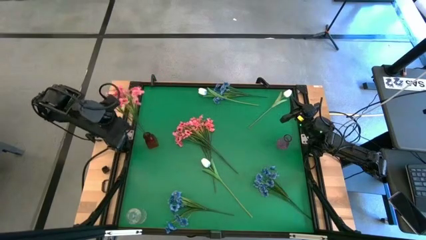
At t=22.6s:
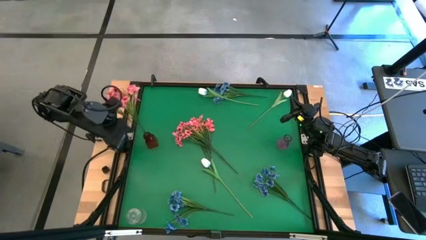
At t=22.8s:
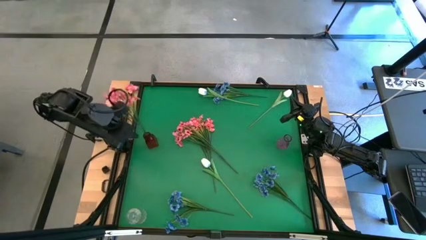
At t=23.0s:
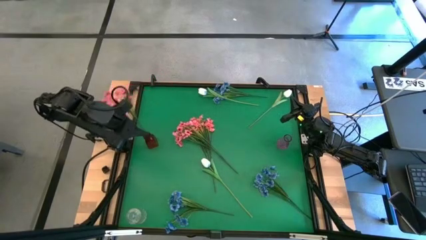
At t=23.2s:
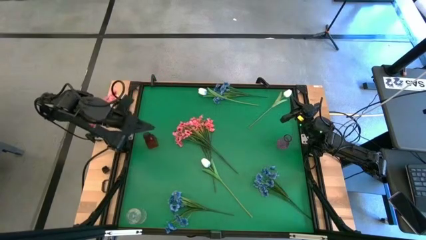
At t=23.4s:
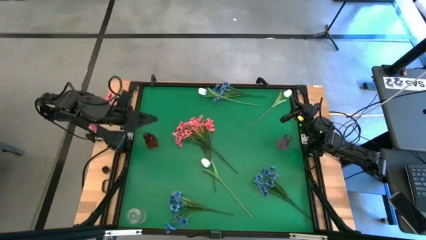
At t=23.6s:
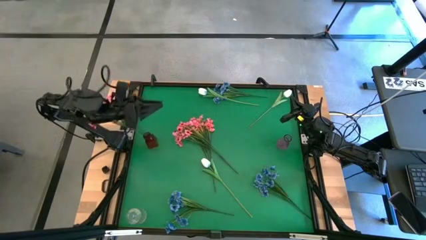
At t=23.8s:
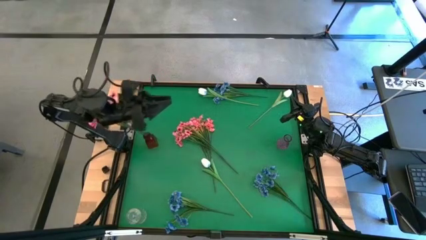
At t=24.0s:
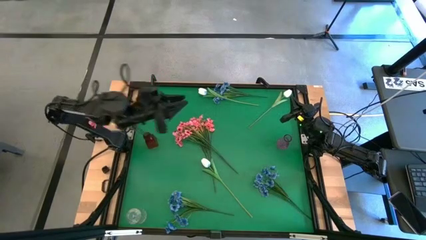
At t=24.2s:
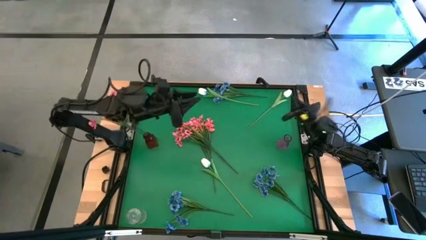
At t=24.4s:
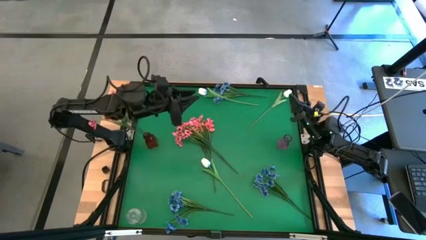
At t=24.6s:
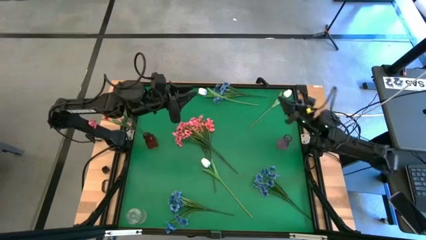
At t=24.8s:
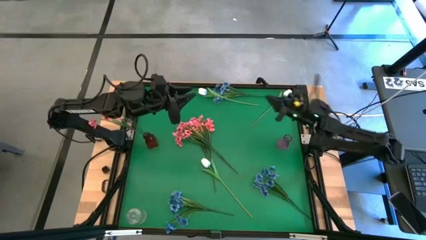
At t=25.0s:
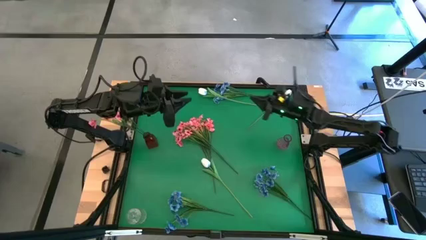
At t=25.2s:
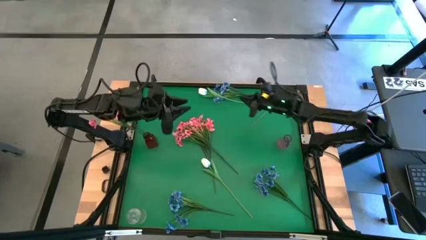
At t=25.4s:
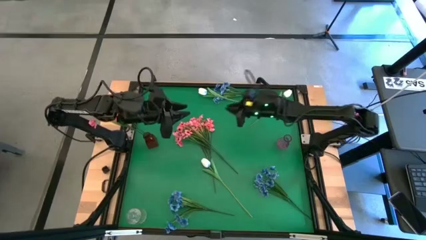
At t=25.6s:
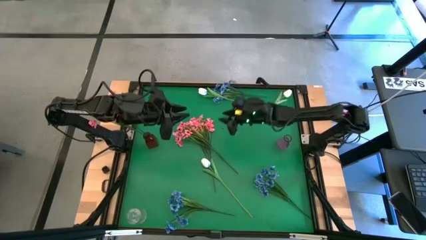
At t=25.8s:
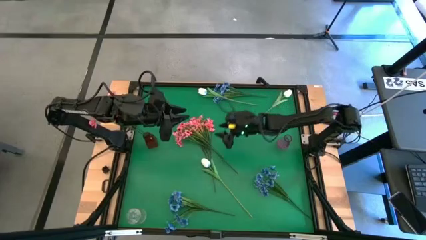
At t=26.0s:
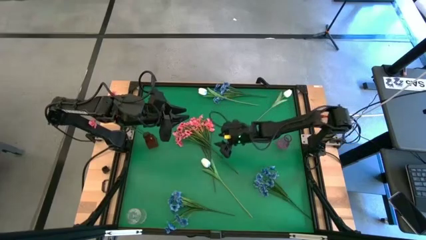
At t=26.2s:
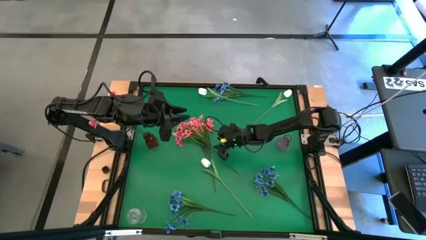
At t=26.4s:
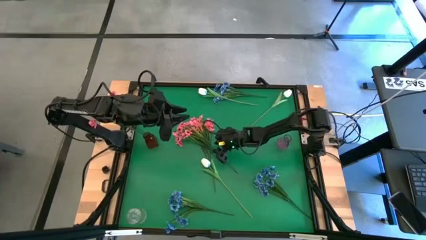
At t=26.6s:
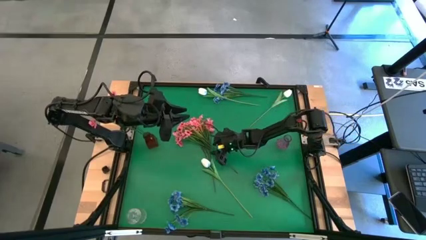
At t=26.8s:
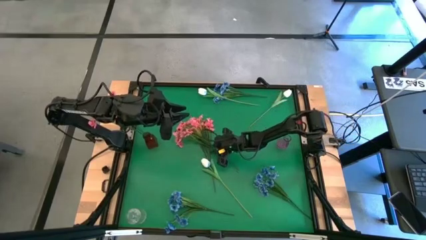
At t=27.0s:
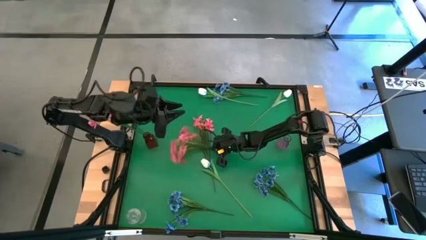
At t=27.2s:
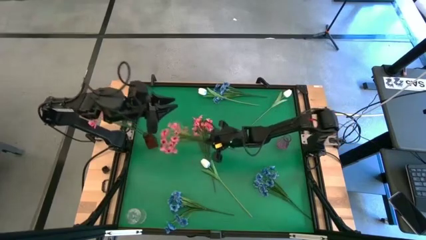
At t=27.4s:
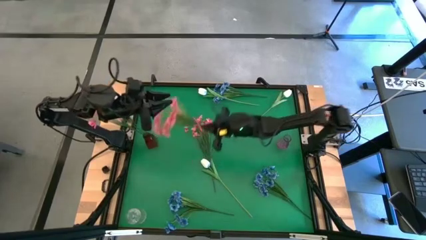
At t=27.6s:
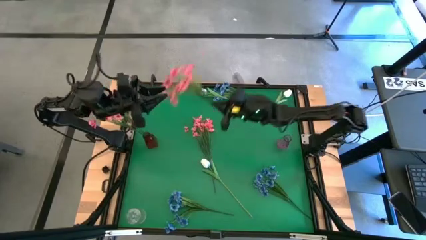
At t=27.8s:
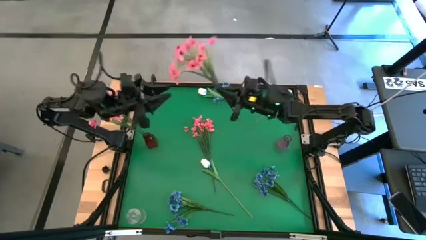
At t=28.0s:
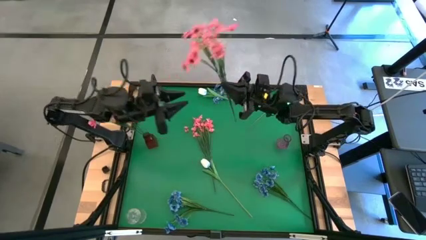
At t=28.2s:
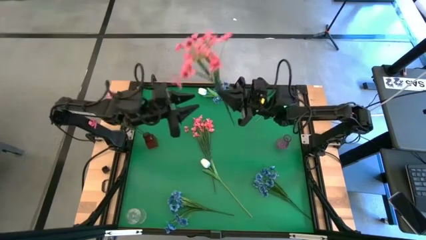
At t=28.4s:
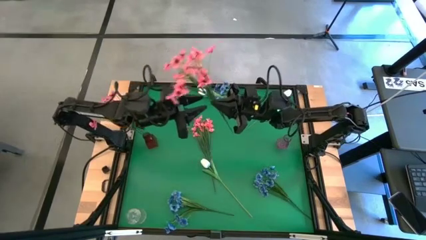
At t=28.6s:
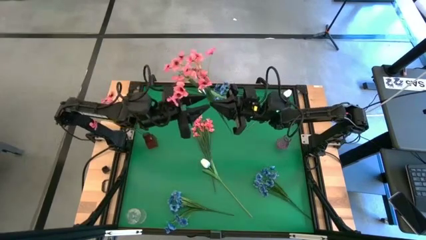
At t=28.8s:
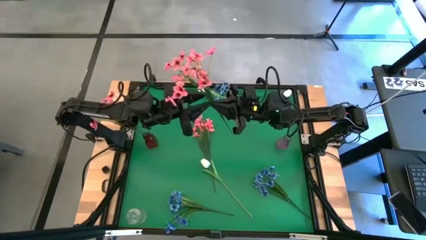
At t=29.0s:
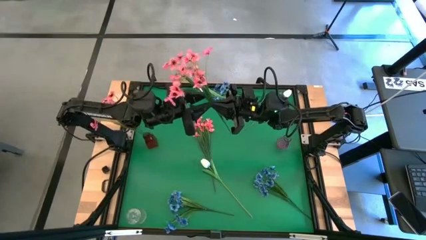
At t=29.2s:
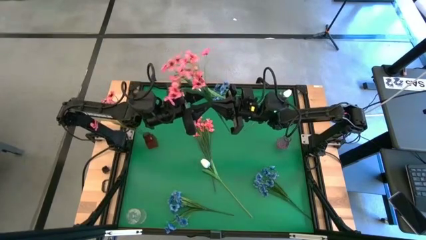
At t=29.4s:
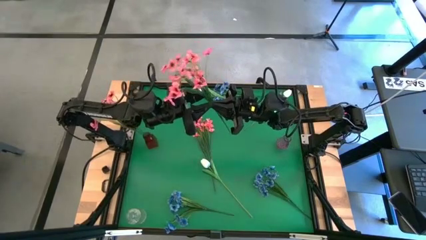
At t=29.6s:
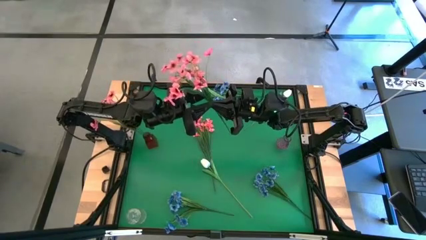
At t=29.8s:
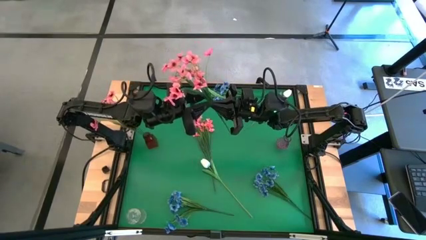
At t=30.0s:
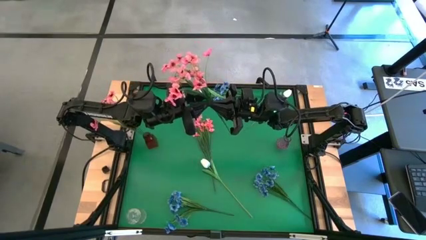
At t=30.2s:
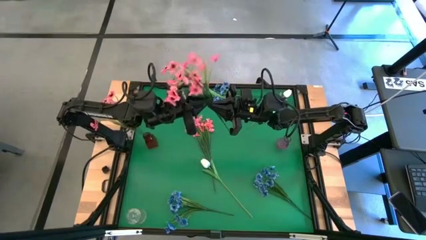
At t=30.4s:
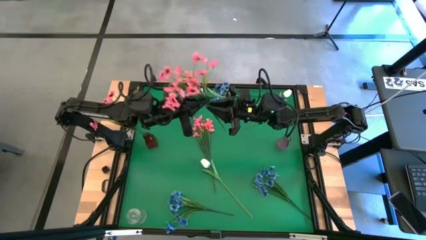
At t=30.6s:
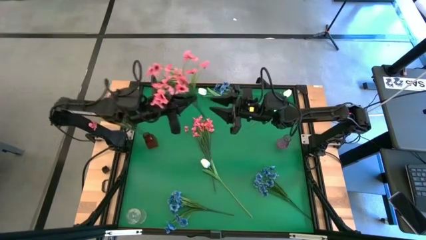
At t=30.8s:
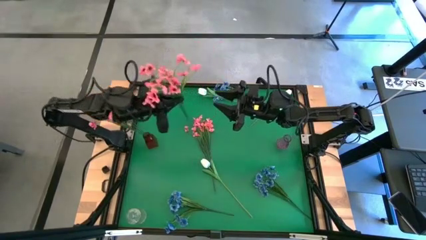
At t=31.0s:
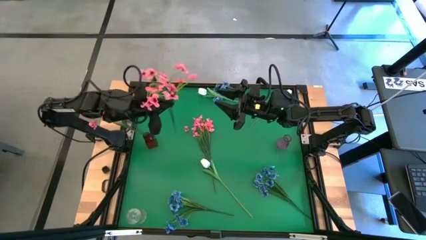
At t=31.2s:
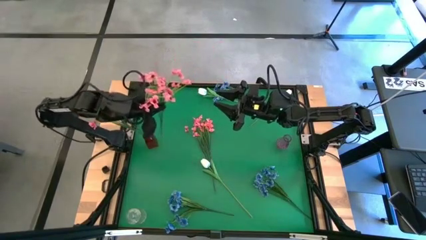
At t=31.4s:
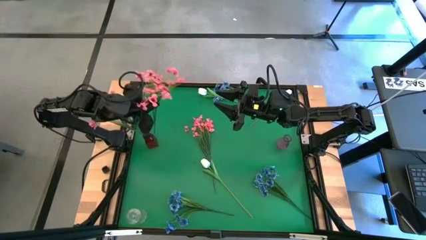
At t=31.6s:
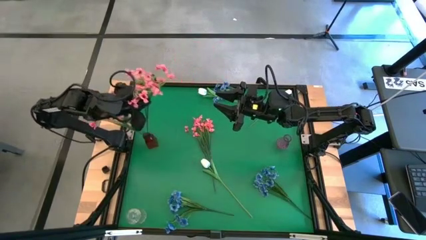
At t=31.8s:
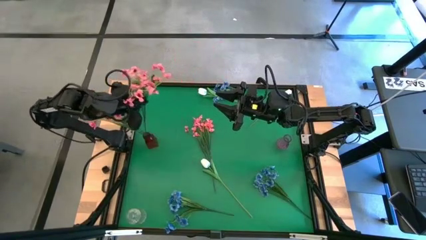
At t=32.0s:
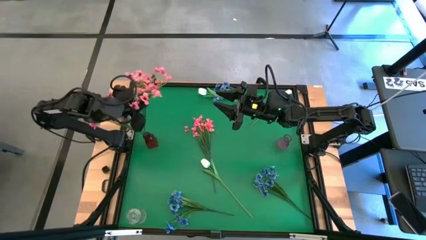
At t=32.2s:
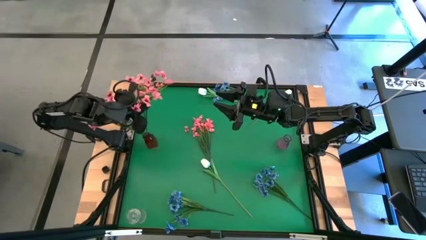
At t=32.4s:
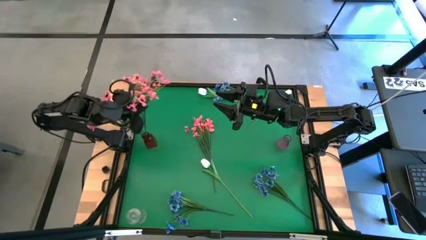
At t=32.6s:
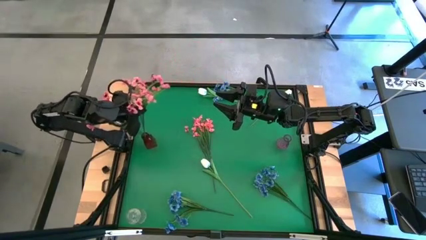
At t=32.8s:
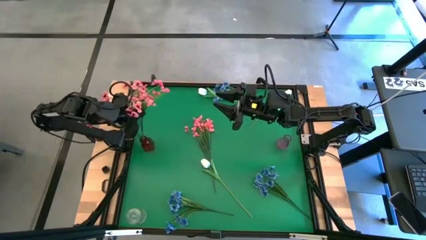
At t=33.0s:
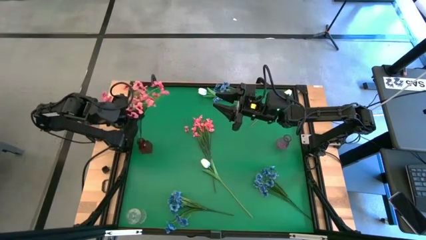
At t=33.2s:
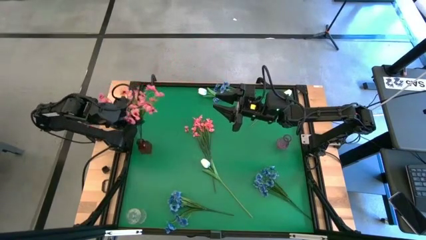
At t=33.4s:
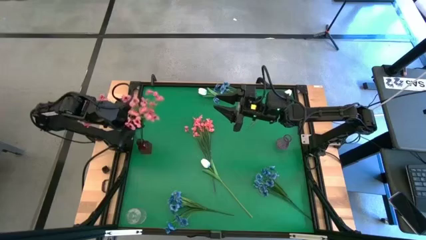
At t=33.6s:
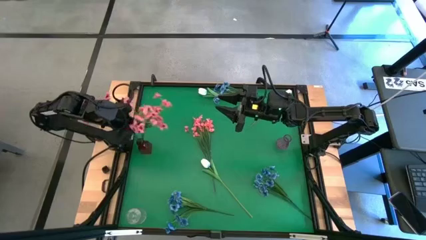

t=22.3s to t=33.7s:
Task: Sort flowers into vase by color
Put the left pink flower into the red vase
